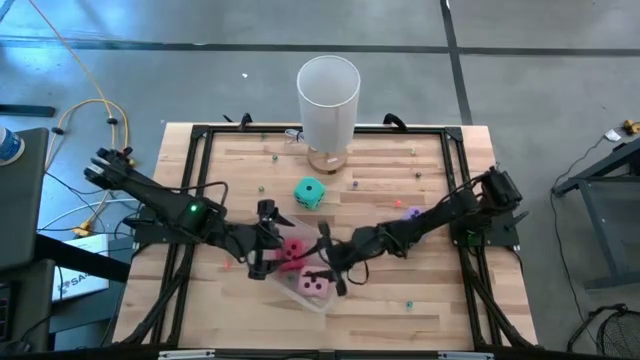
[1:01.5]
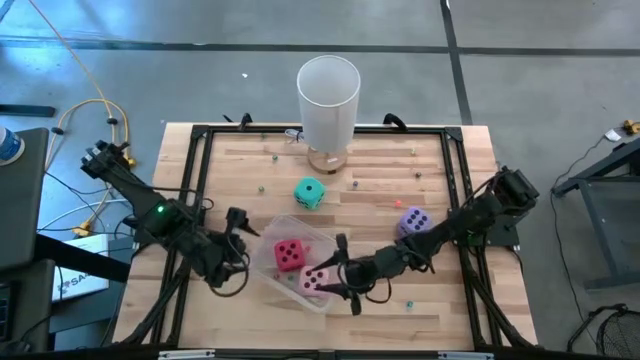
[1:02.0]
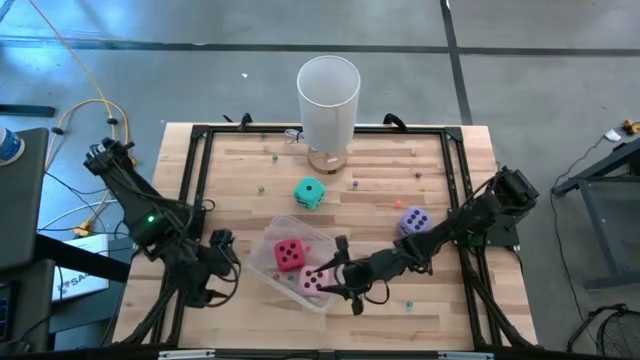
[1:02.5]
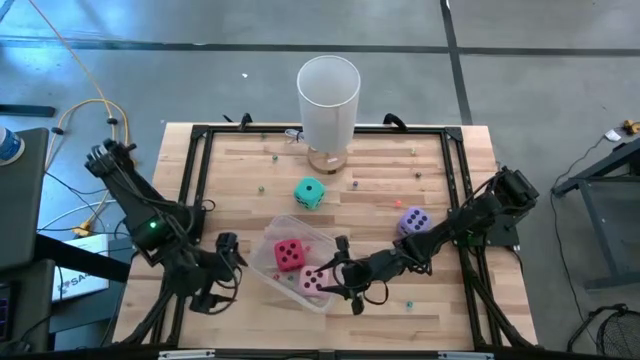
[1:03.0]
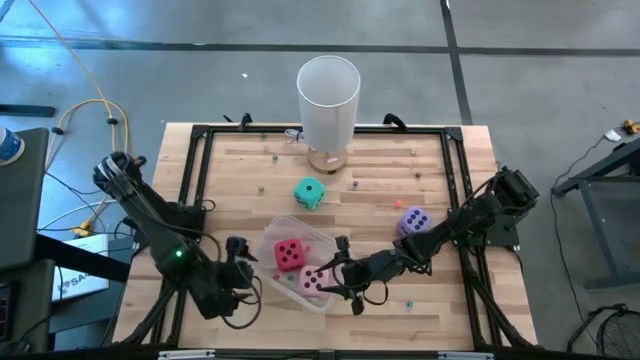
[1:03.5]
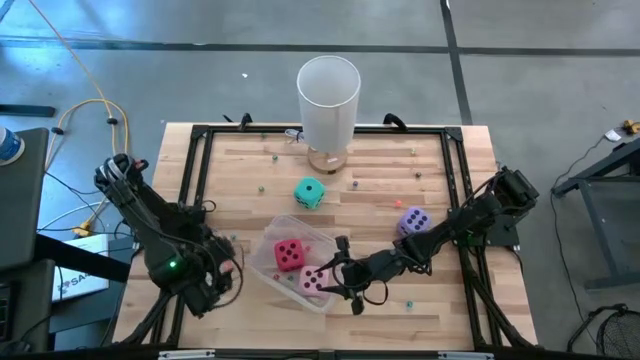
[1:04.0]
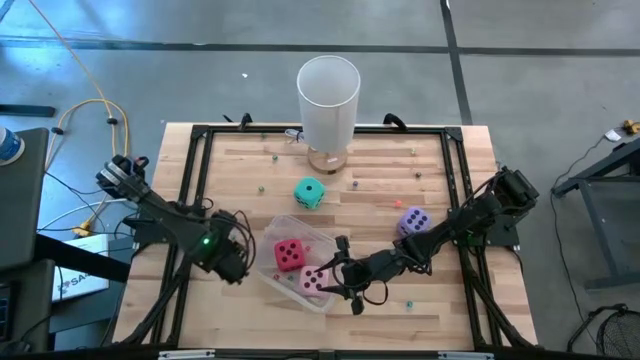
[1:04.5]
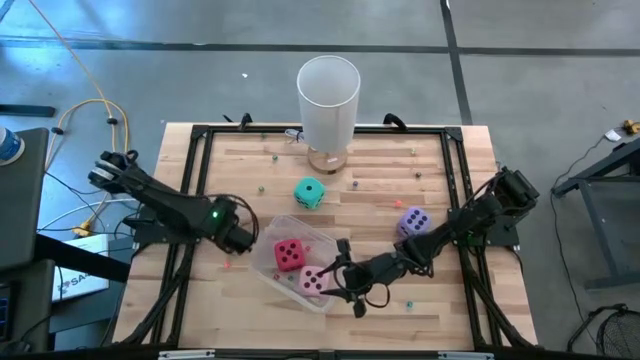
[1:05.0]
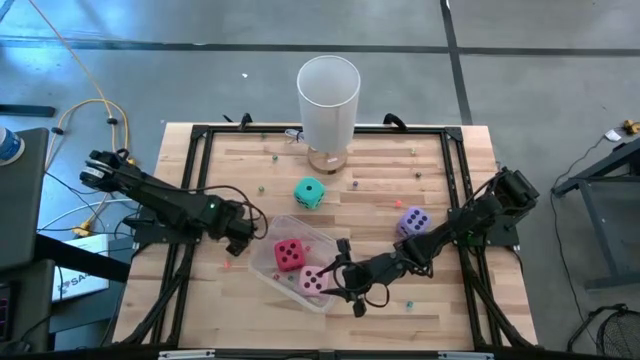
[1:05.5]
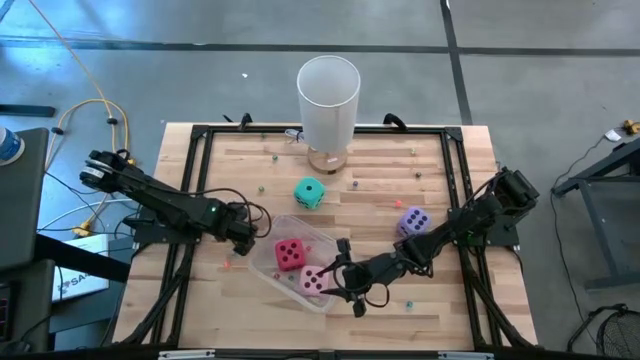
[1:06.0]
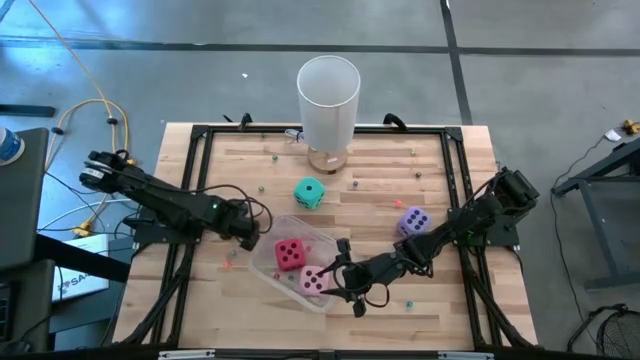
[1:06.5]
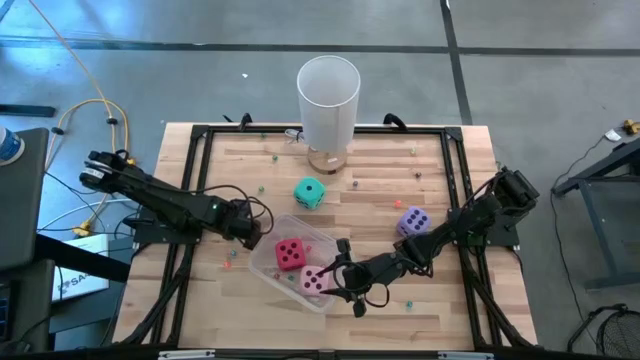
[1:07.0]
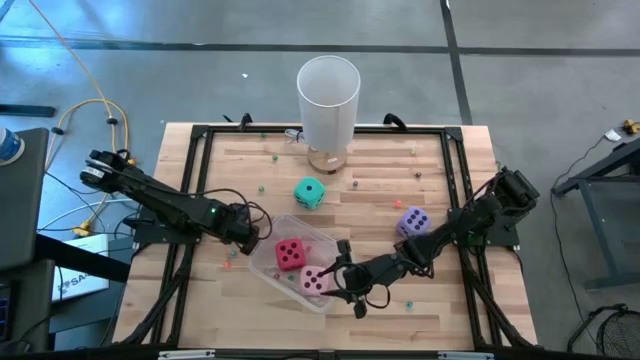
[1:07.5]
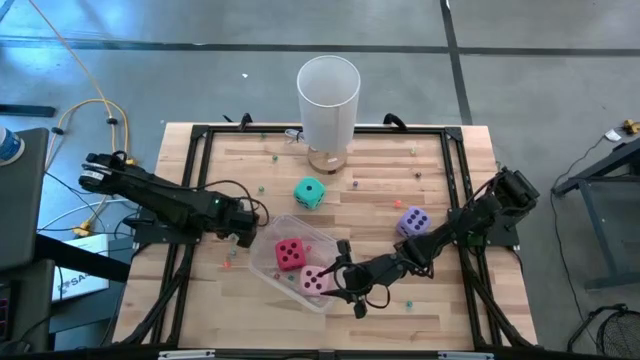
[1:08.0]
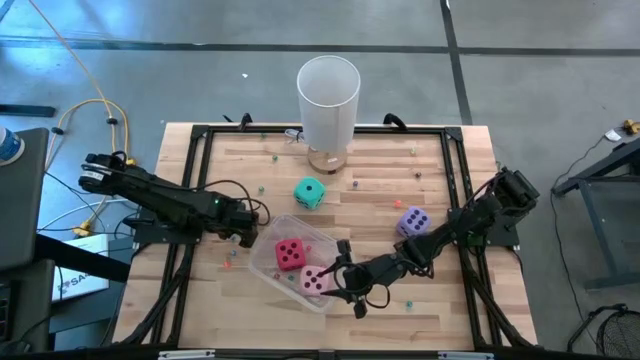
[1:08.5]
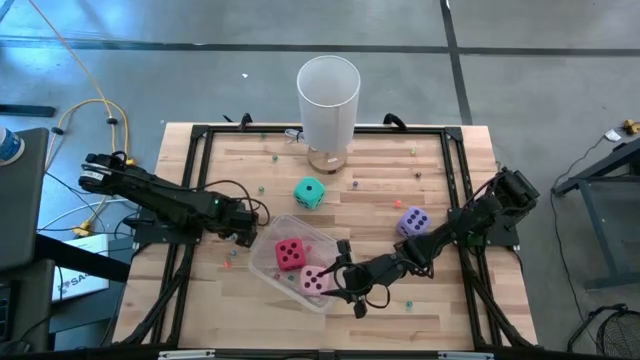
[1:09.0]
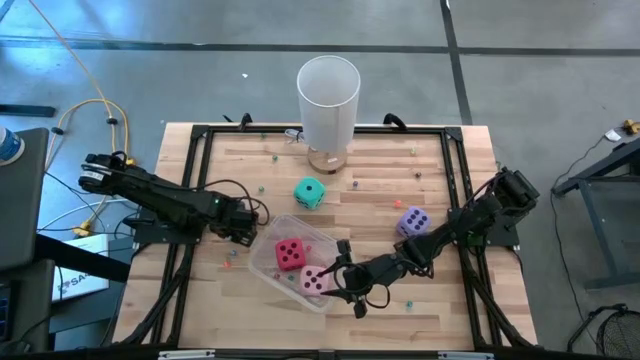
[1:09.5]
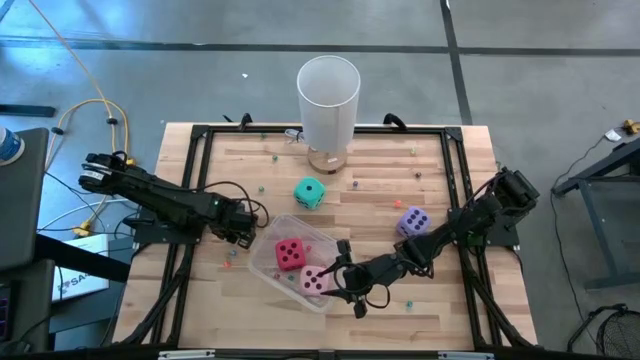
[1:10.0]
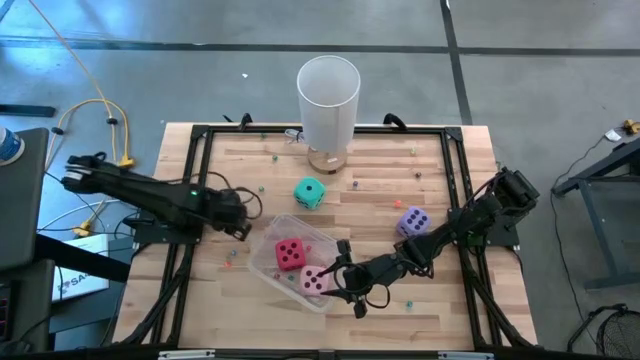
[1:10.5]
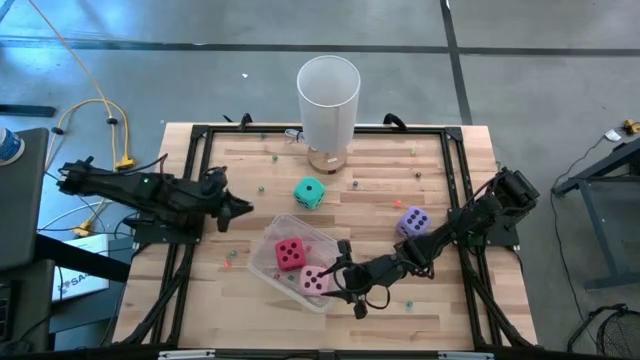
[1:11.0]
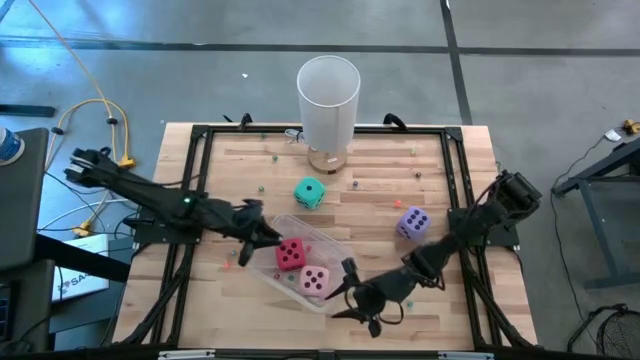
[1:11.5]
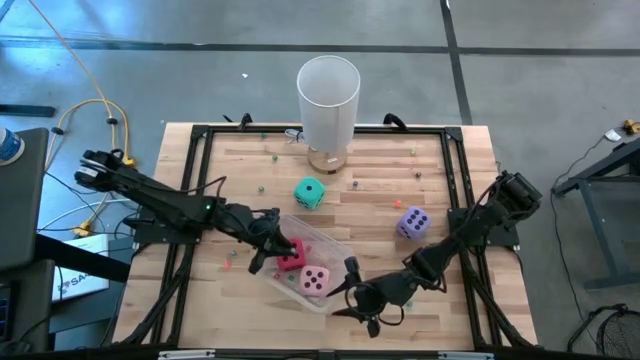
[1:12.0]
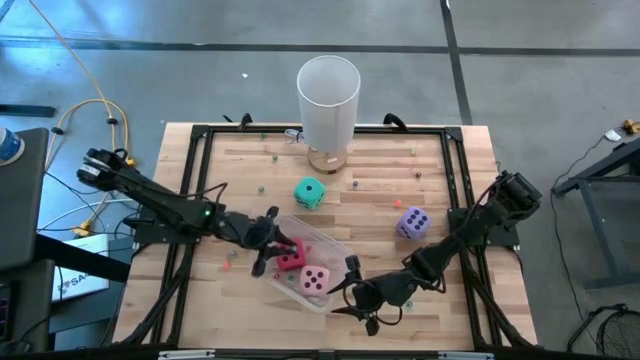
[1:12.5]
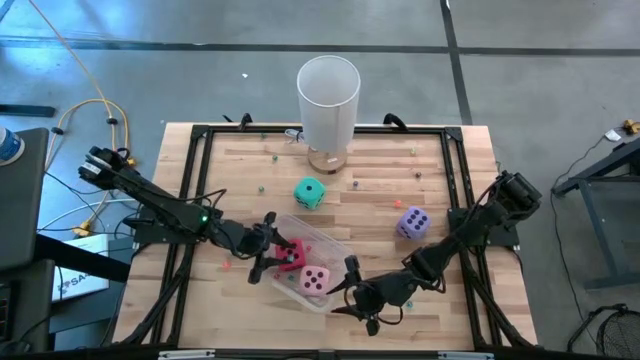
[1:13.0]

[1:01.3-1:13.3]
Task: Pick & Place Dice
Put the small blue dice into the transparent bin

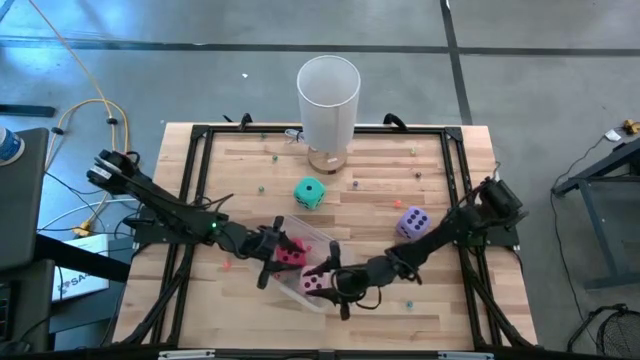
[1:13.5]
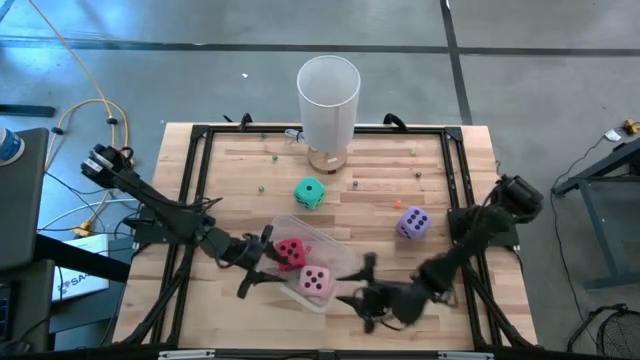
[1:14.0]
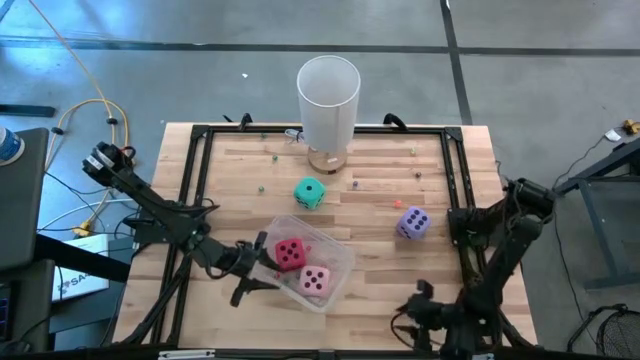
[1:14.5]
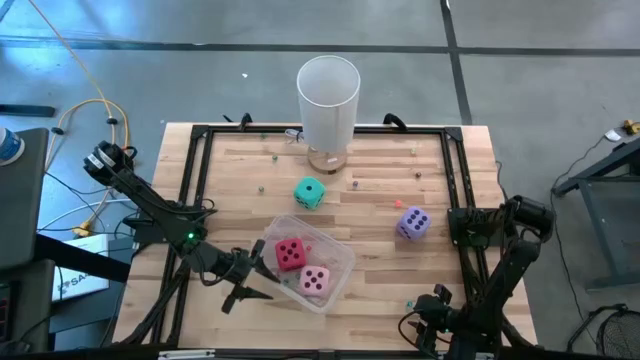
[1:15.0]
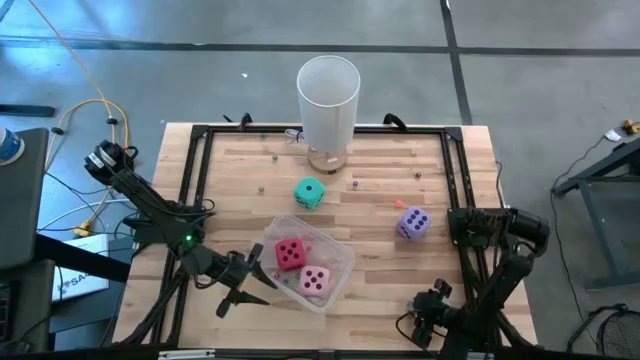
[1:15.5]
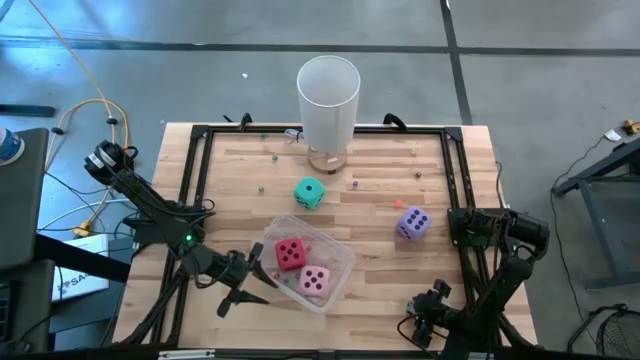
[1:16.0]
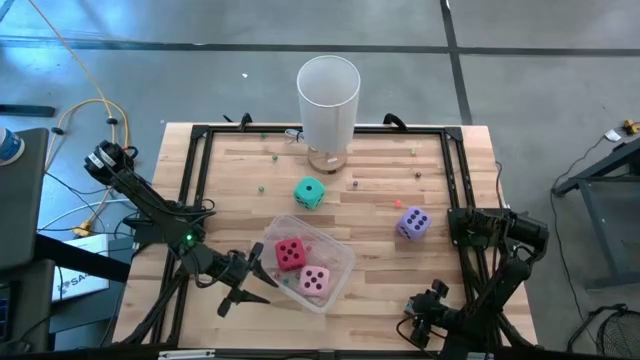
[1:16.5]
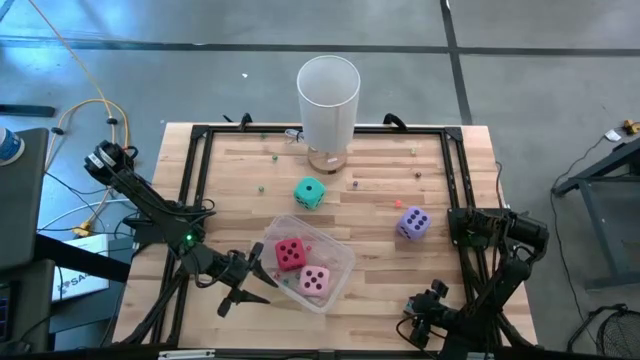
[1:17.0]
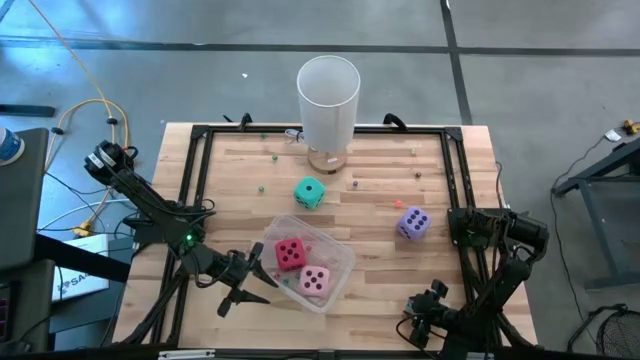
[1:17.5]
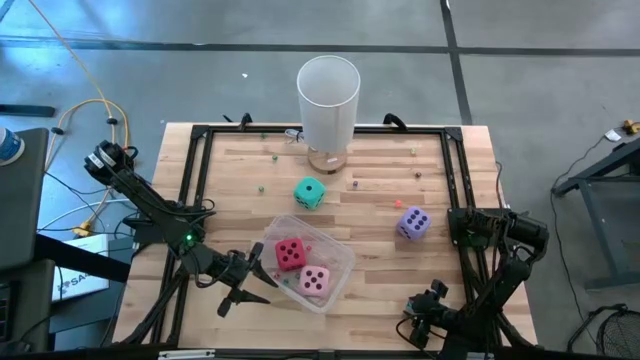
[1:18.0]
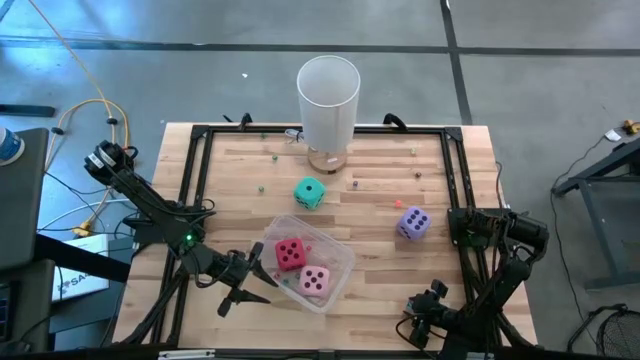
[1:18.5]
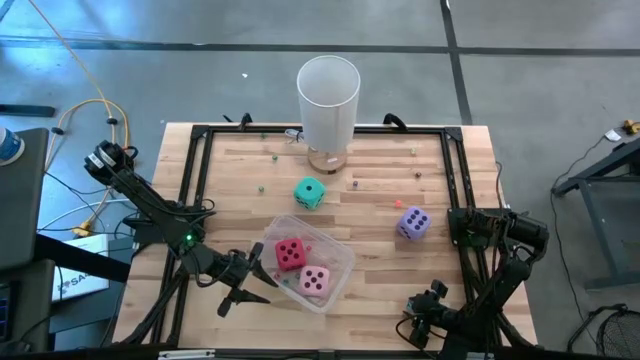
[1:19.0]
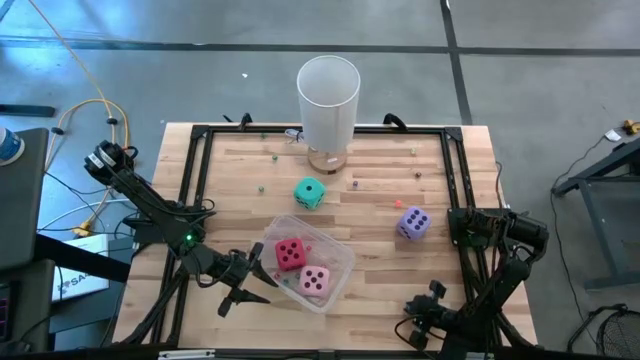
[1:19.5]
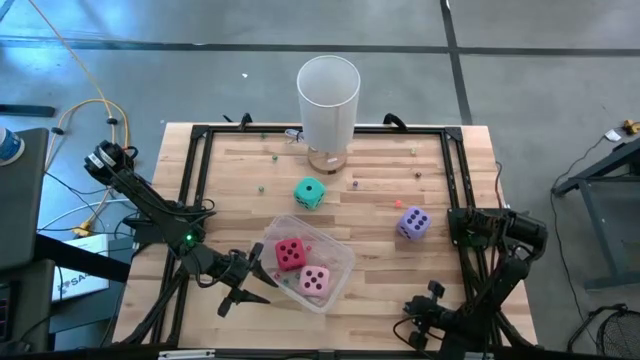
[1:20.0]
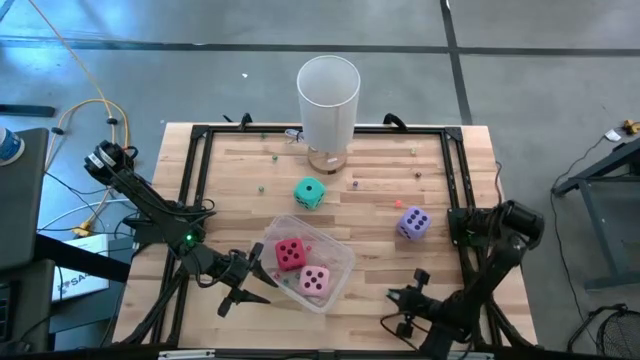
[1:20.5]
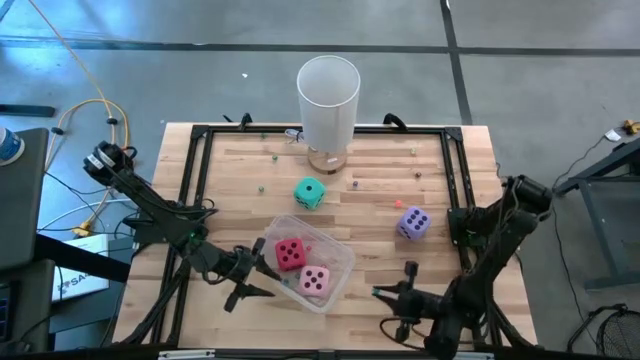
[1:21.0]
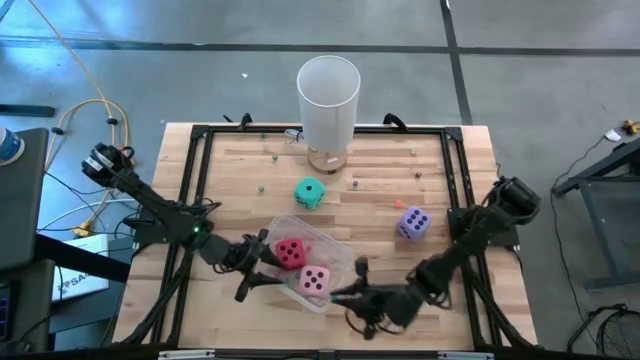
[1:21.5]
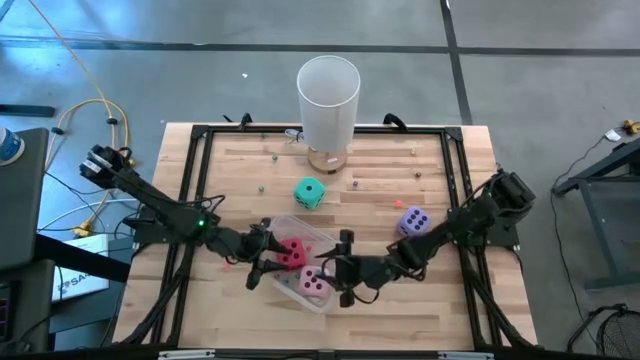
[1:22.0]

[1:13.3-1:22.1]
Put the small blue dice into the transparent bin

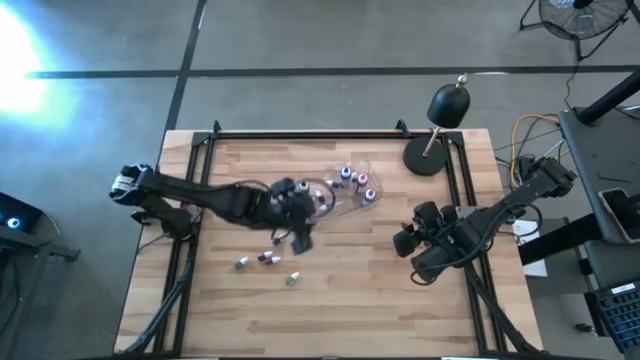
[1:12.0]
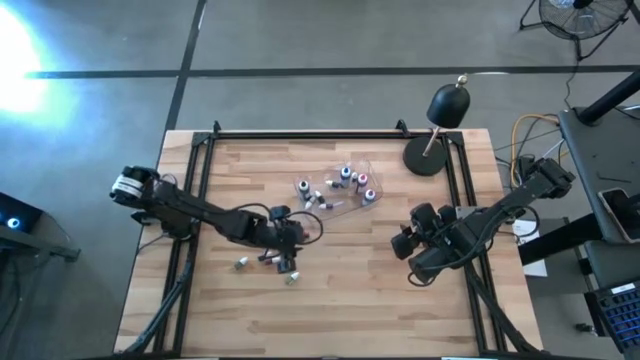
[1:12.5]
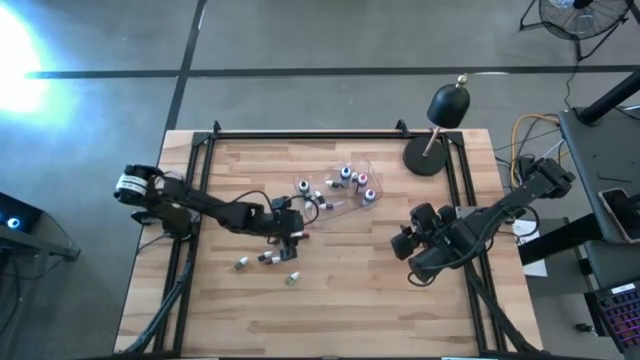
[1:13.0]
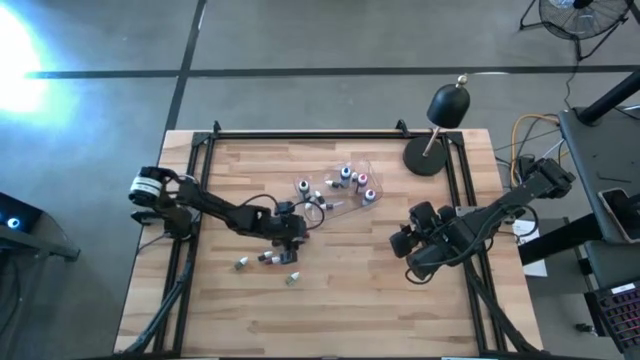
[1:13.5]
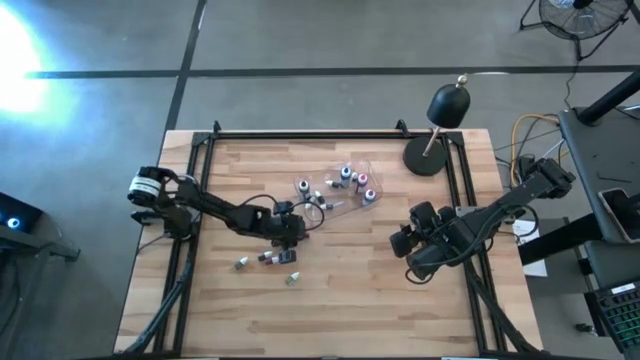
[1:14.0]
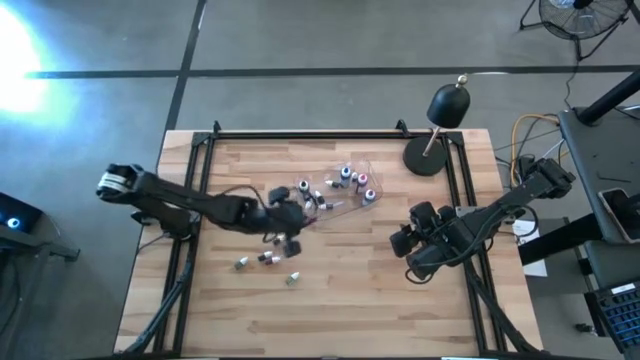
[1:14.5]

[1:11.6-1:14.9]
Task: Pick & Place food coloring
Put the small red food coloring bottle into the transparent bin
